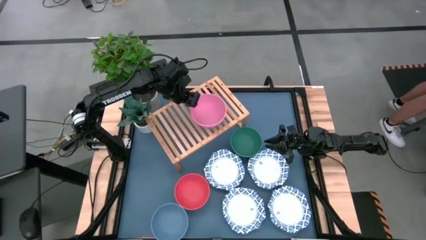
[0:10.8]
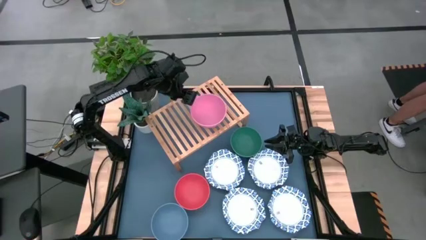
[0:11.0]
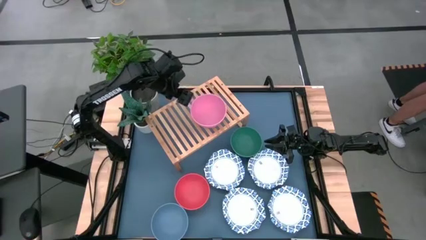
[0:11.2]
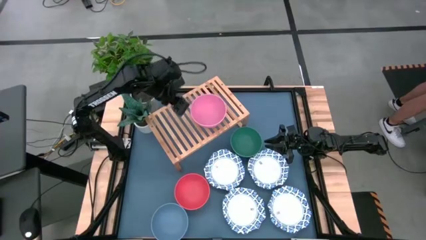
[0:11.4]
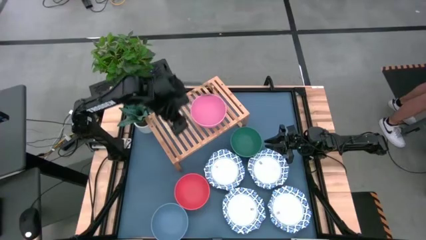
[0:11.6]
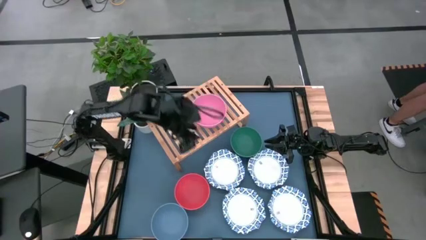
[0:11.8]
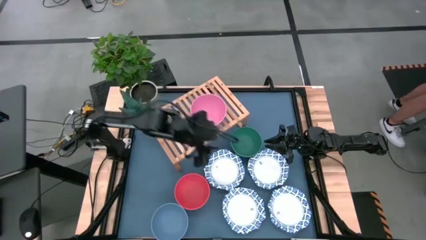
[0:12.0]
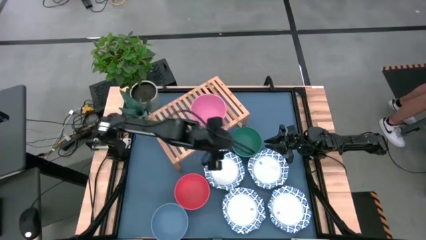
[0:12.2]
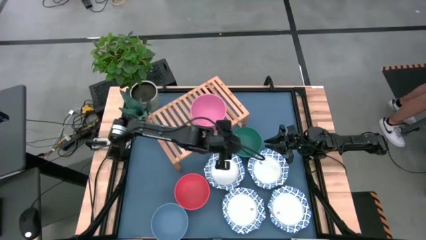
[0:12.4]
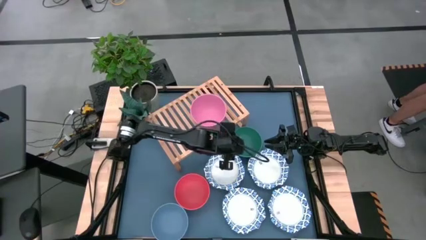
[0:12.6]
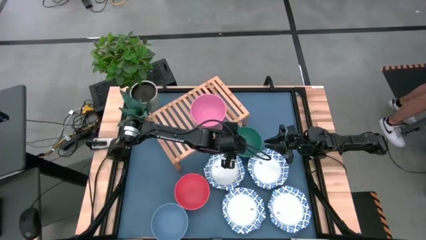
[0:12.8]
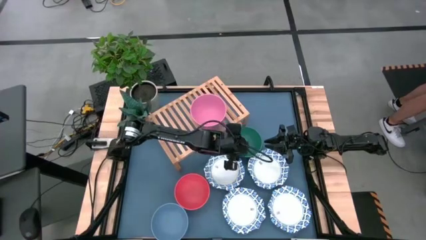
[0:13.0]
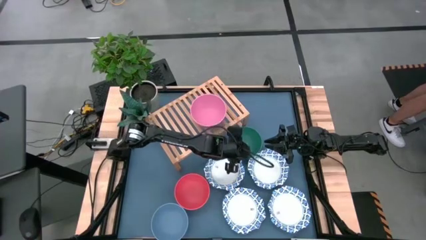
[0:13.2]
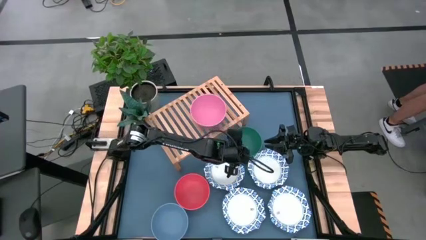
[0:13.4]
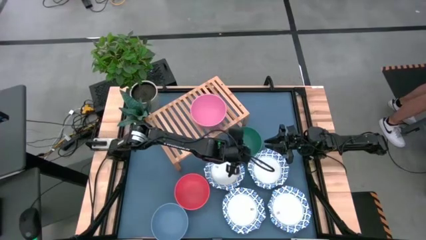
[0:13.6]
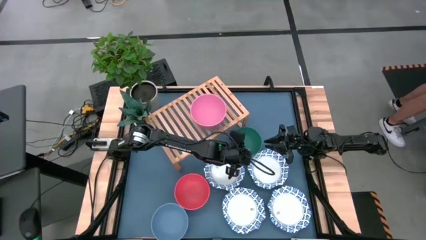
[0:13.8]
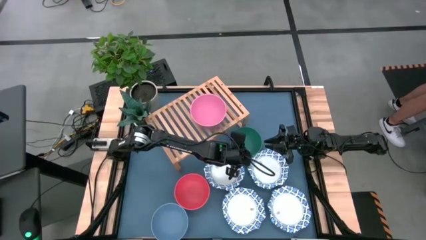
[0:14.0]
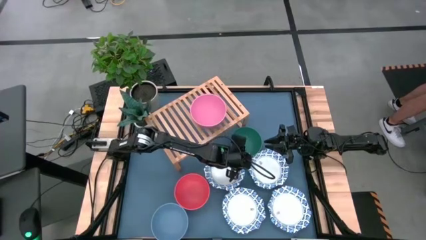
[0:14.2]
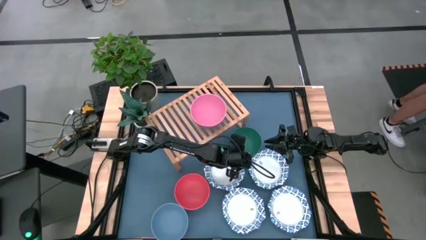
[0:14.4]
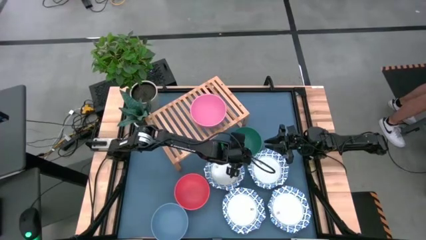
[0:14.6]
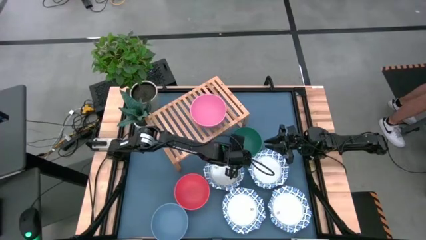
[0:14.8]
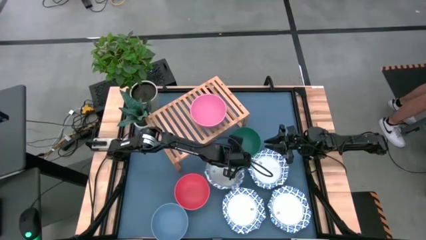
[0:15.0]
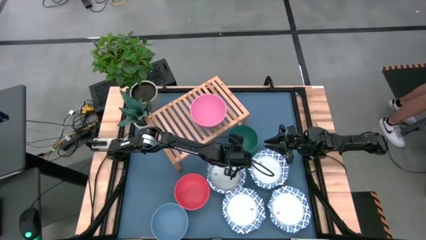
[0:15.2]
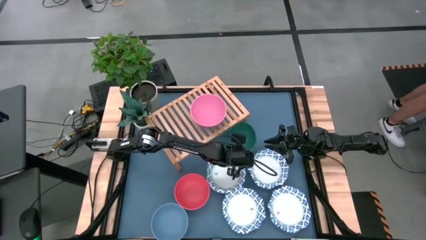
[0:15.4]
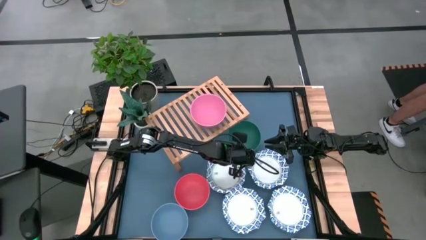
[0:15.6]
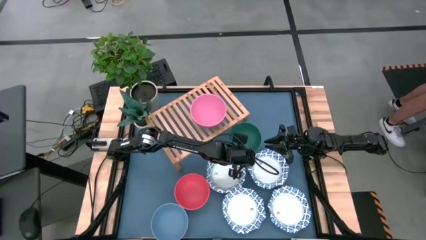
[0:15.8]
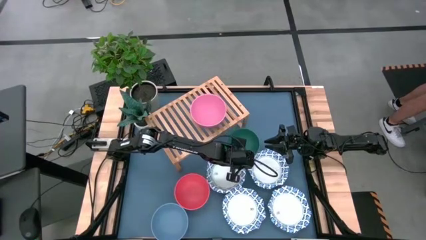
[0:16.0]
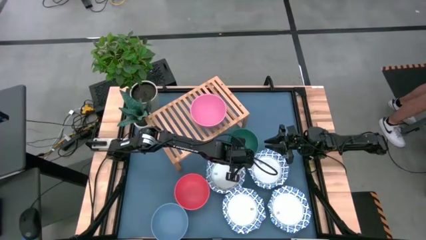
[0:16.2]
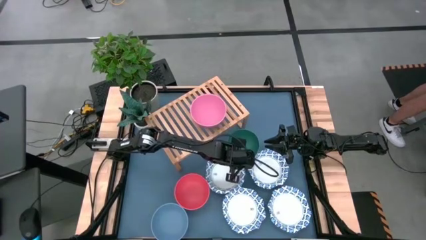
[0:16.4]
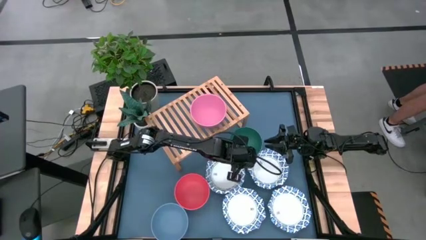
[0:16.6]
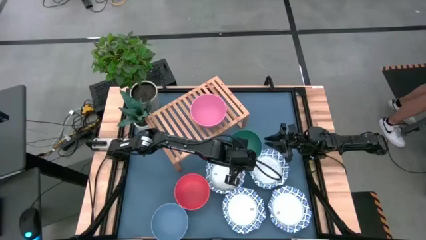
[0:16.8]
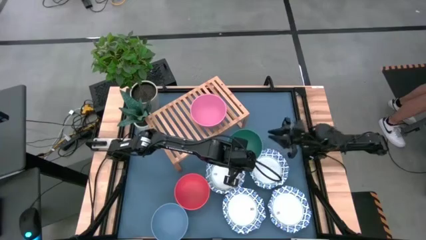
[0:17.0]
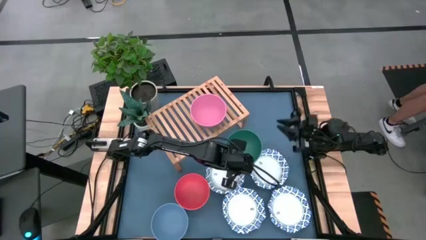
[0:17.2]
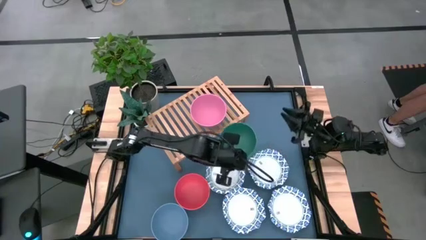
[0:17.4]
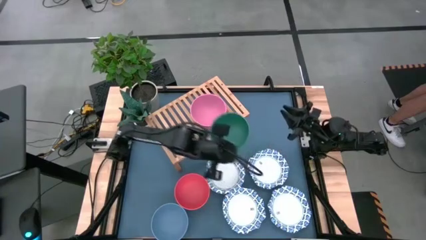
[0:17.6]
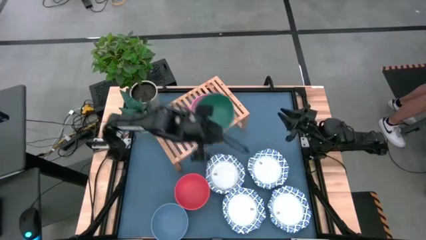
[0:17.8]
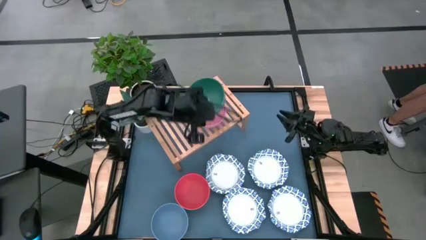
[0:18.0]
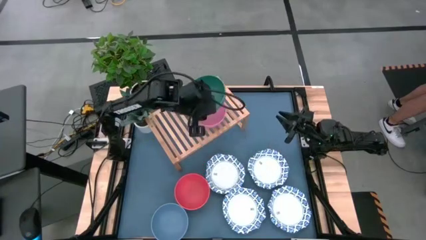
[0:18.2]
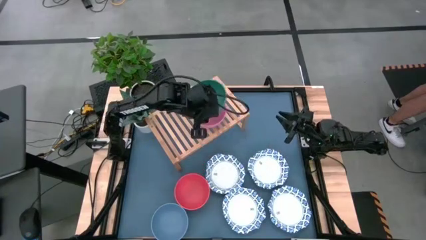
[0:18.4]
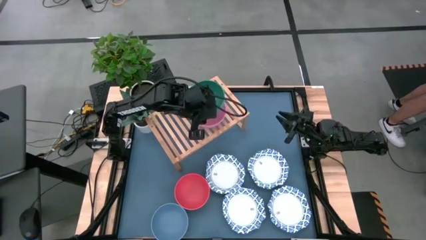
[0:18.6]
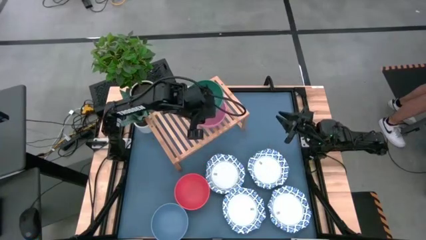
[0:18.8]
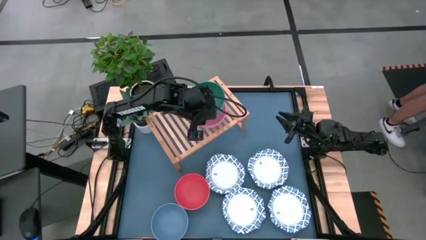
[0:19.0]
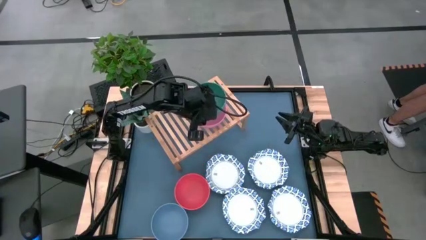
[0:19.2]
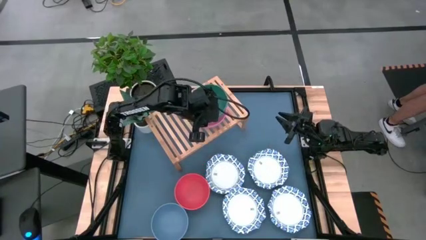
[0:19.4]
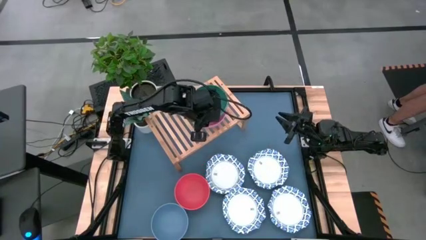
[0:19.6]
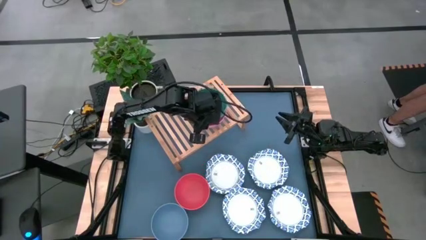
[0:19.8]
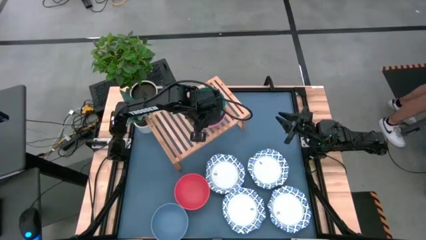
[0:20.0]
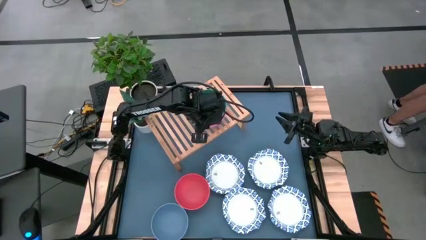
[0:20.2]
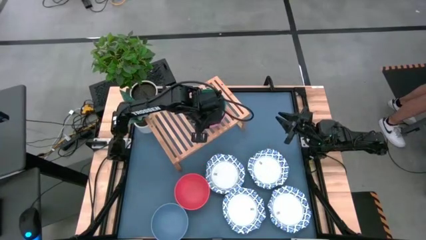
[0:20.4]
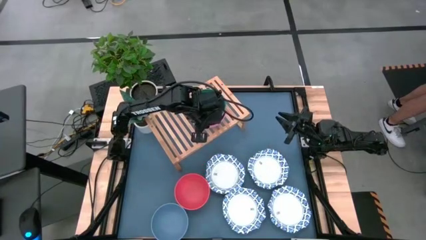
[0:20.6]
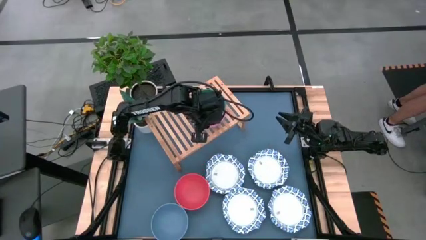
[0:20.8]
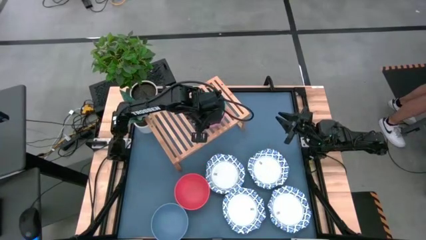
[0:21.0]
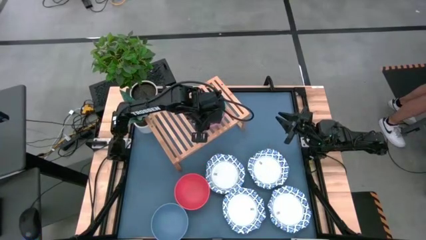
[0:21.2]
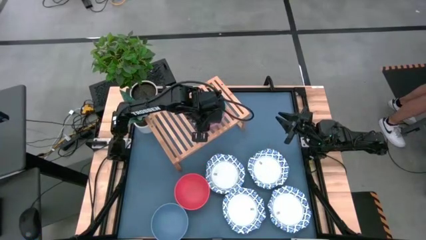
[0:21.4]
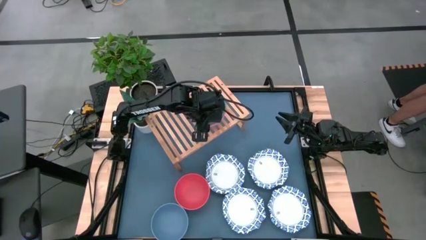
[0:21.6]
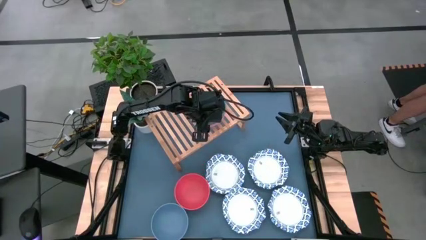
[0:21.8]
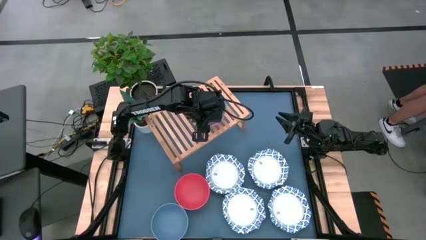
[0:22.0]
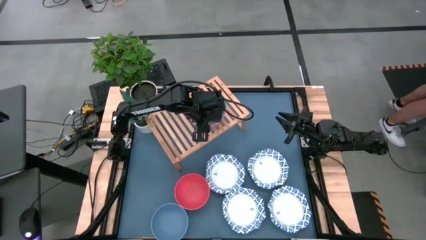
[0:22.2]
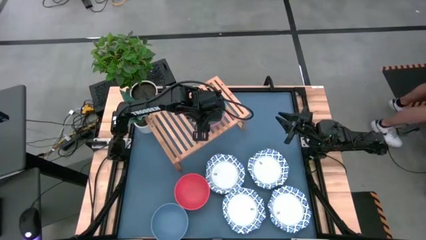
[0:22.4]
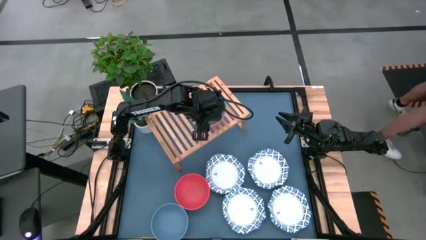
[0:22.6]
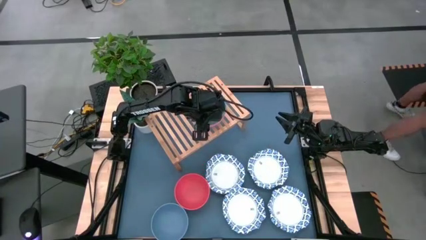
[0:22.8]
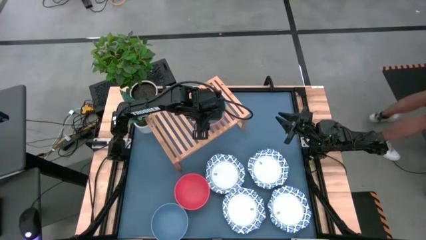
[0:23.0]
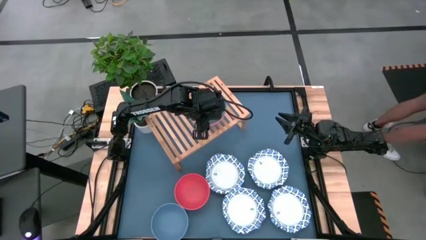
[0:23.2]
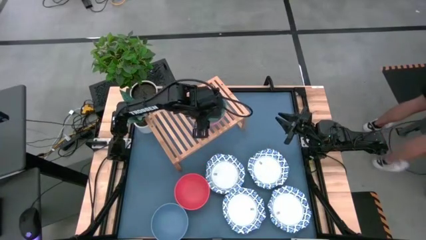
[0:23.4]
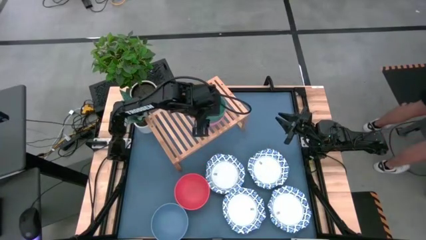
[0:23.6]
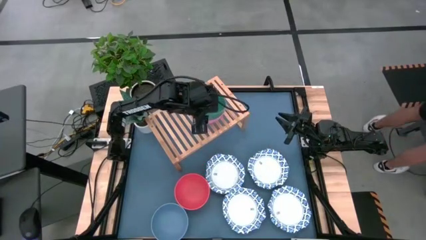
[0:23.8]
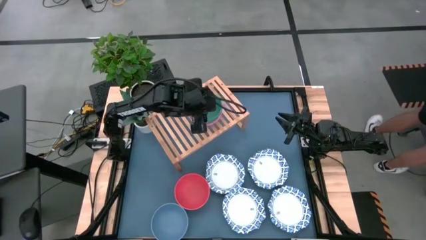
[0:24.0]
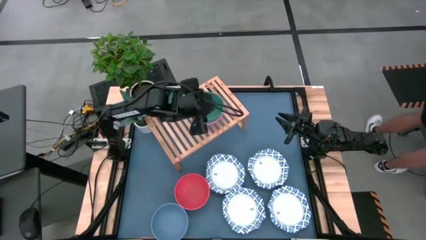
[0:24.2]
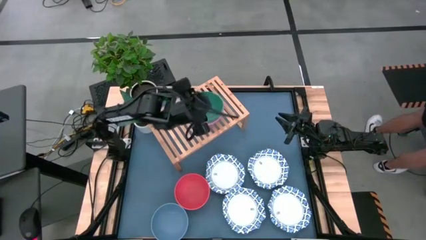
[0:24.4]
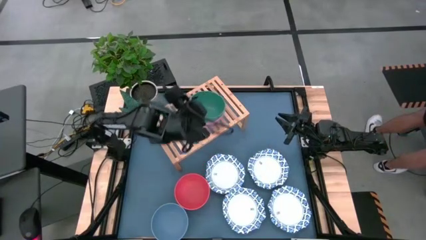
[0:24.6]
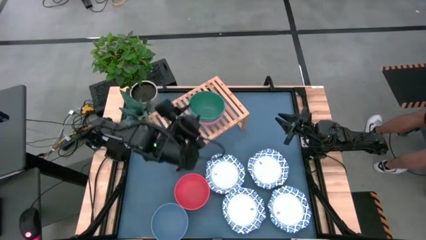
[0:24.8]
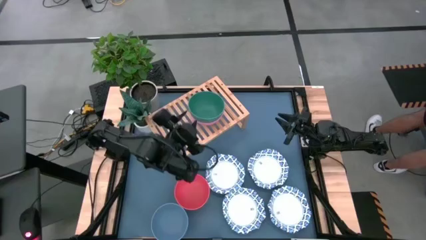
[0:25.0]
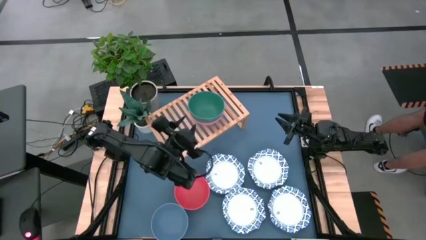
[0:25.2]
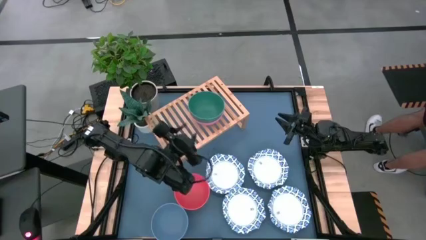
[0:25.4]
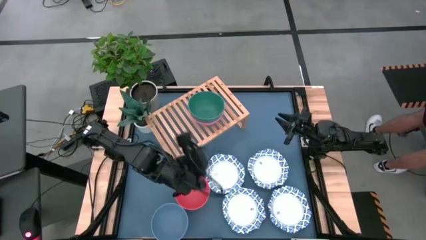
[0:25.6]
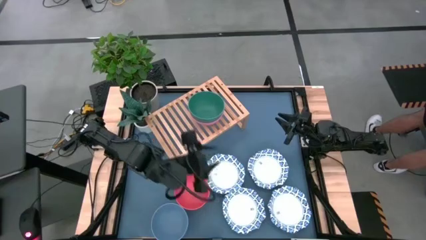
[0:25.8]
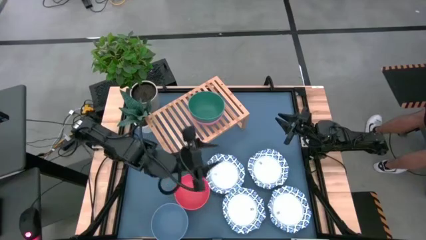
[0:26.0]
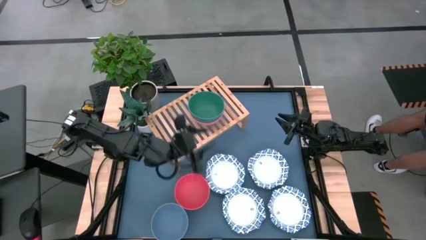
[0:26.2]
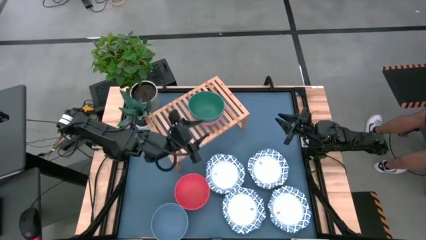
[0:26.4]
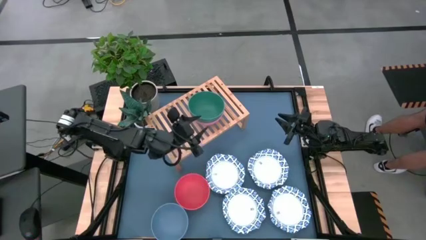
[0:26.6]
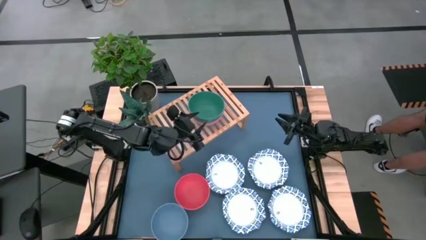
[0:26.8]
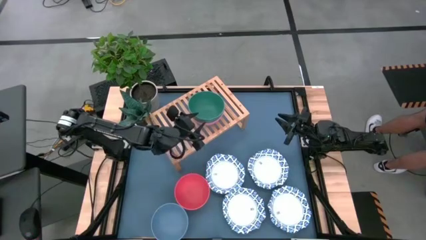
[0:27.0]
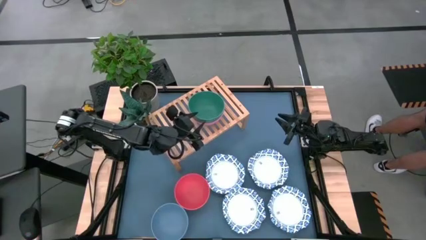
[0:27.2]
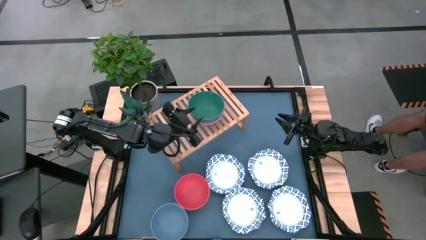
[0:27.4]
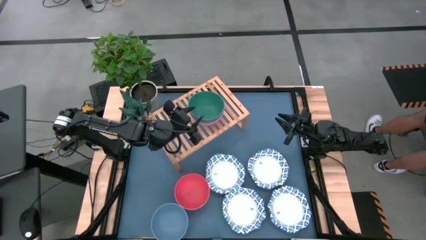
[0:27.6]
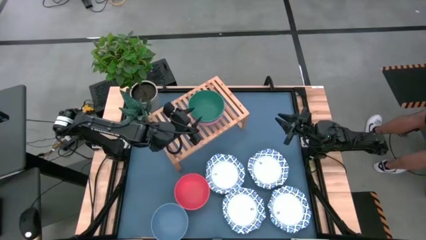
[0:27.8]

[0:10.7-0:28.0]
Task: Place and stack bowls onto a shelf
Stack the green bowl on top of the pink bowl on the shelf
